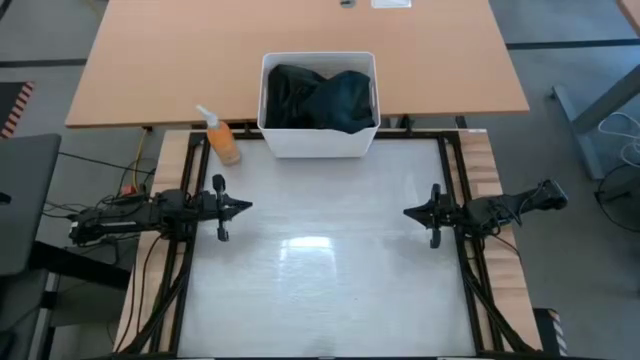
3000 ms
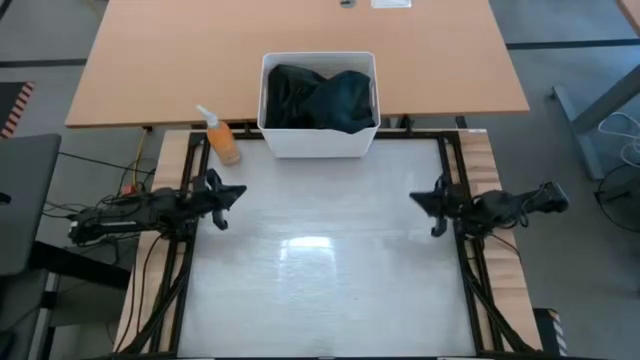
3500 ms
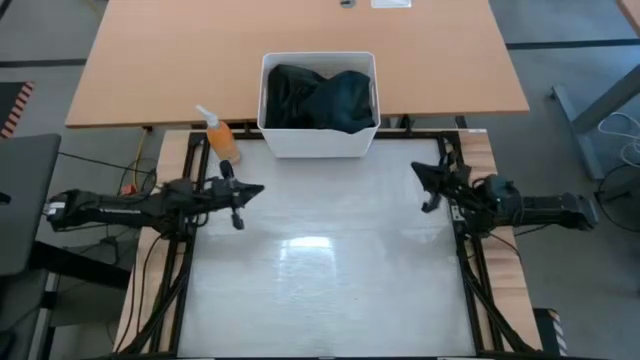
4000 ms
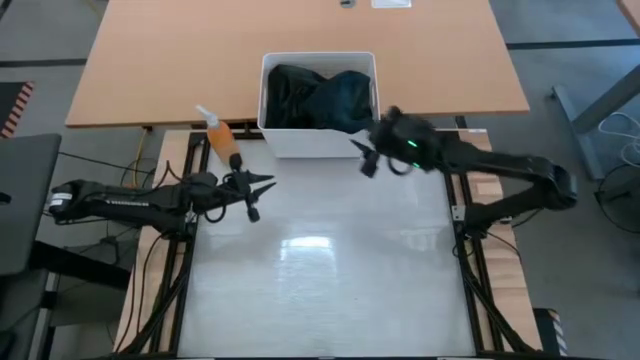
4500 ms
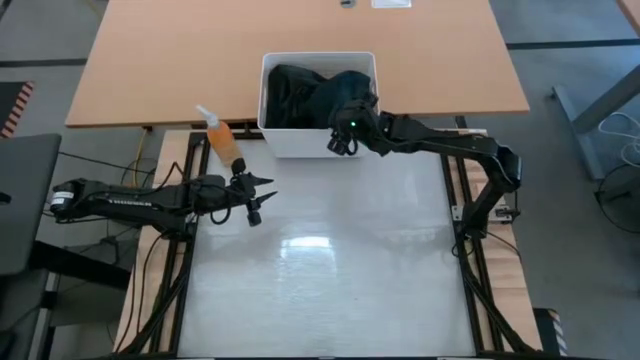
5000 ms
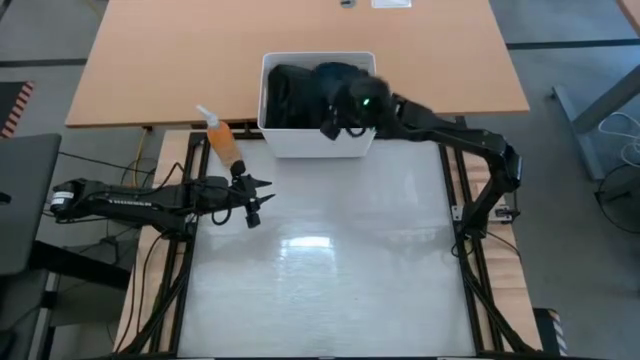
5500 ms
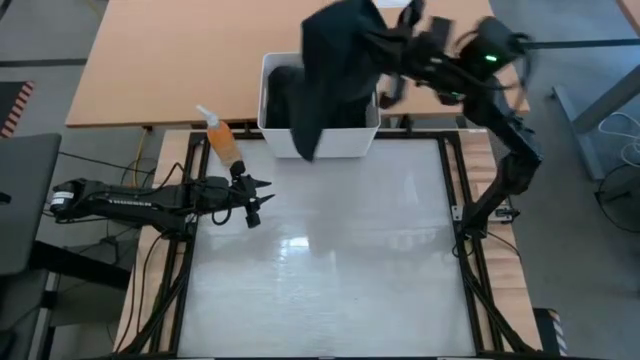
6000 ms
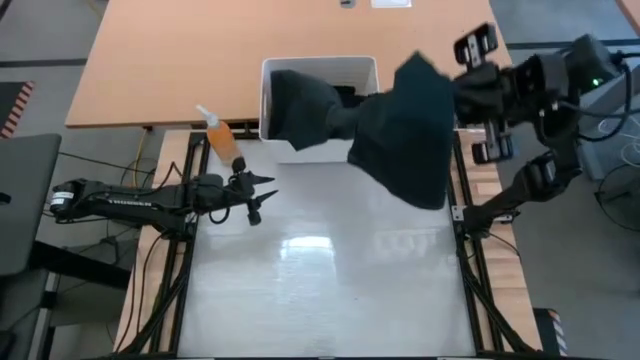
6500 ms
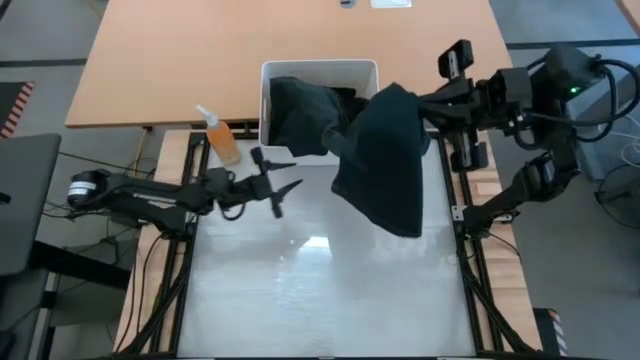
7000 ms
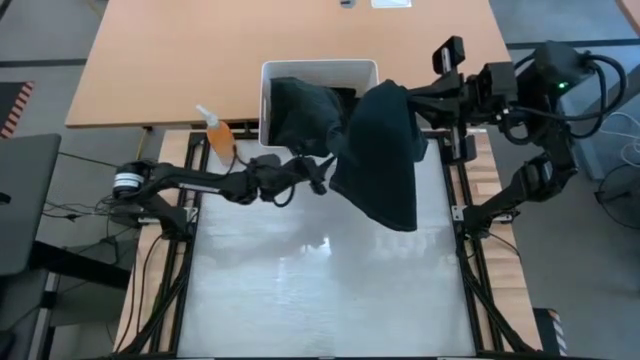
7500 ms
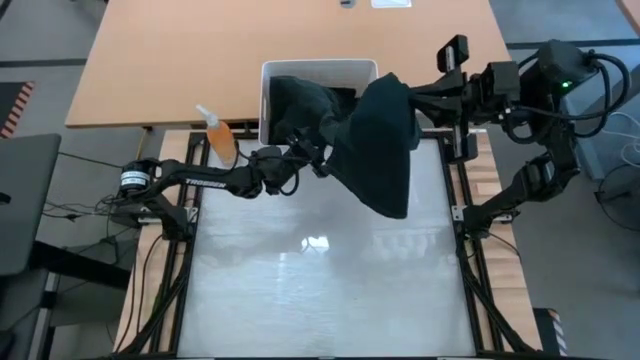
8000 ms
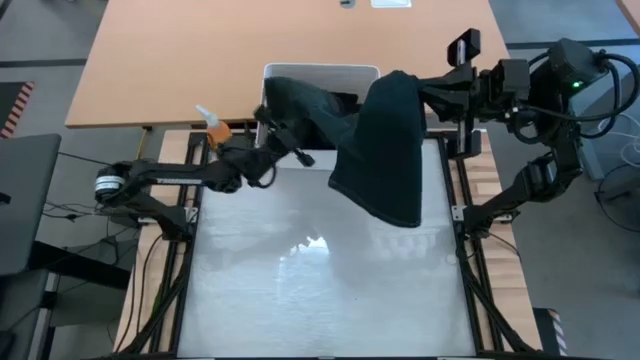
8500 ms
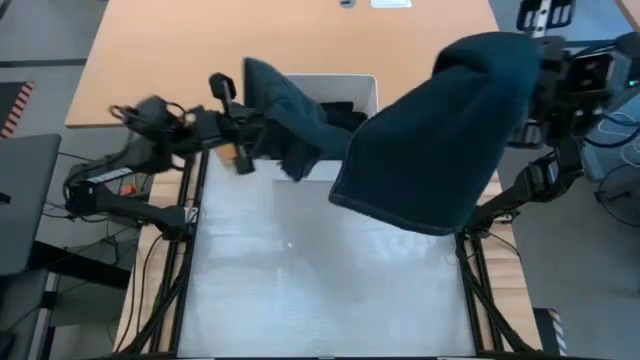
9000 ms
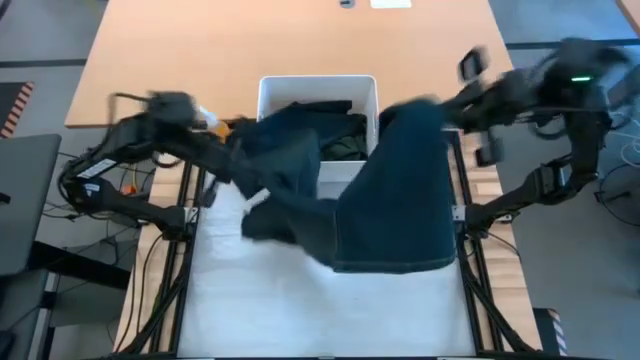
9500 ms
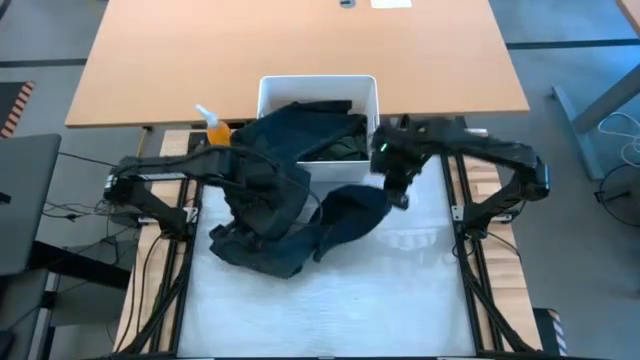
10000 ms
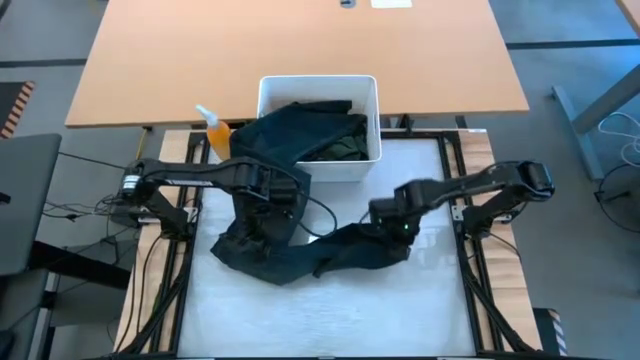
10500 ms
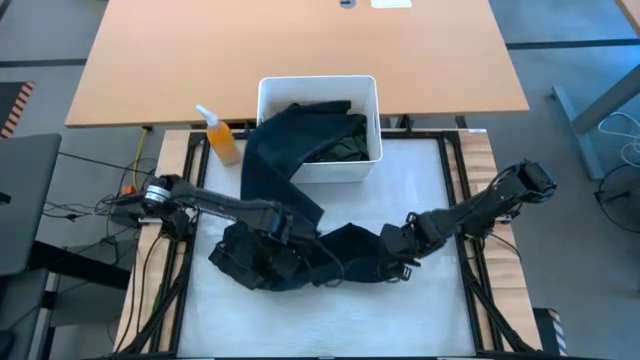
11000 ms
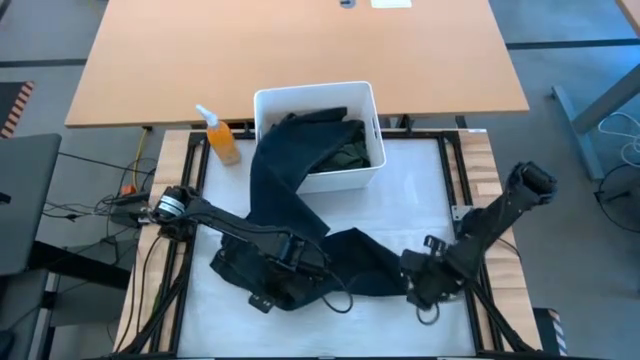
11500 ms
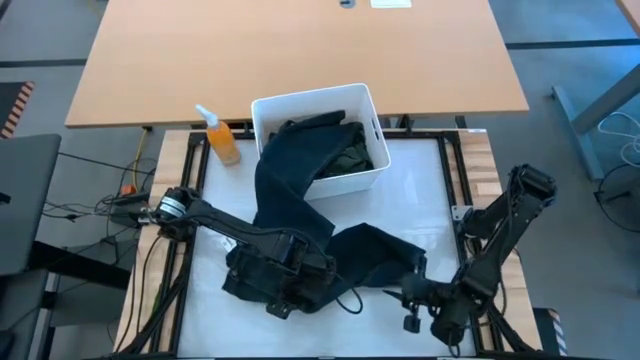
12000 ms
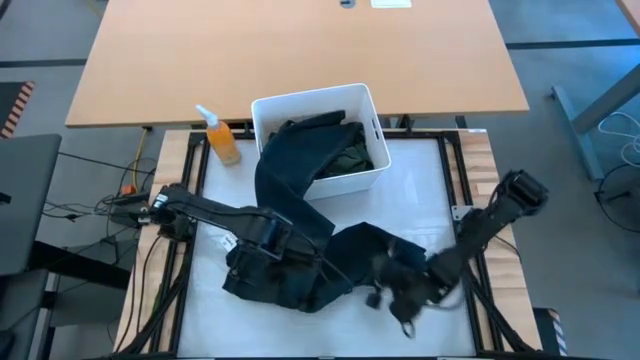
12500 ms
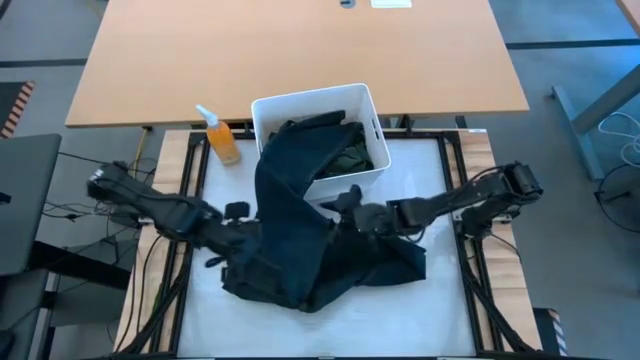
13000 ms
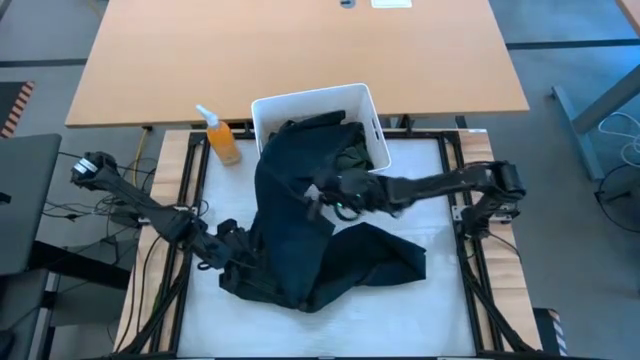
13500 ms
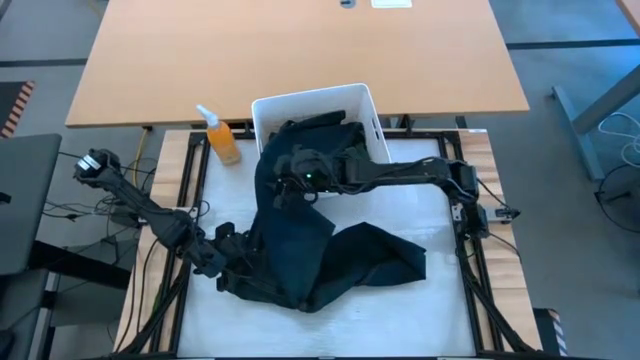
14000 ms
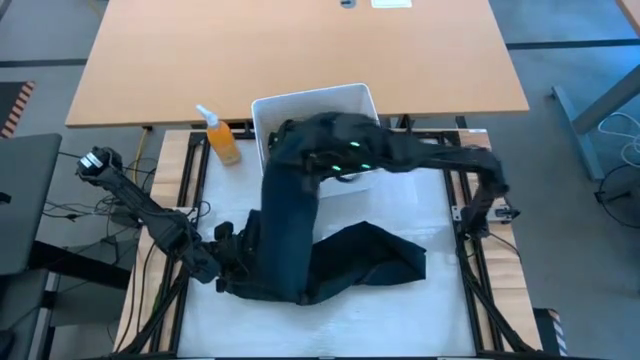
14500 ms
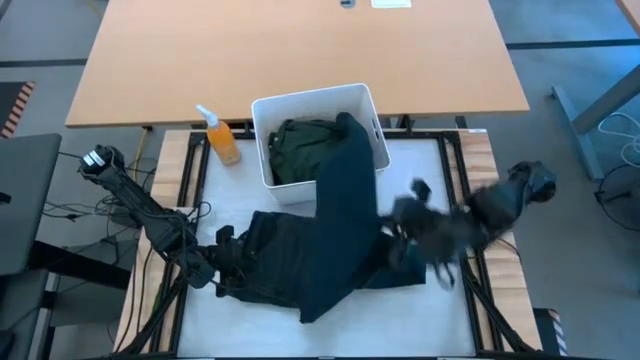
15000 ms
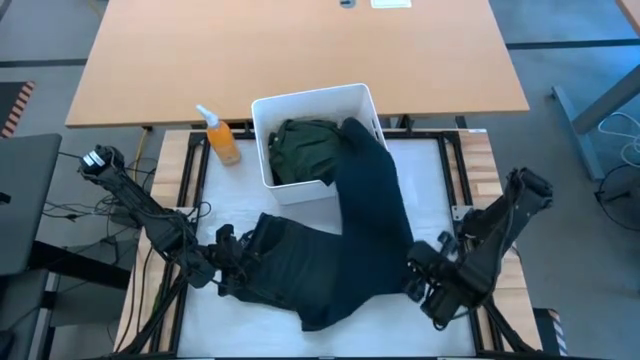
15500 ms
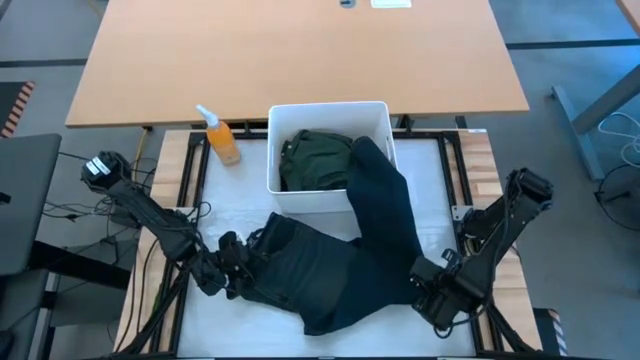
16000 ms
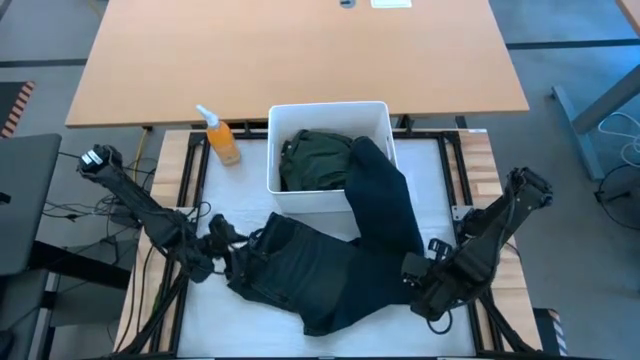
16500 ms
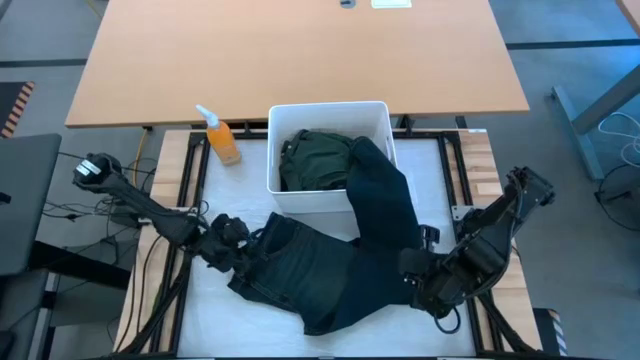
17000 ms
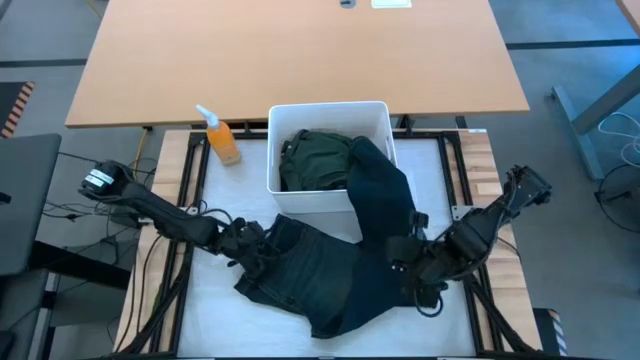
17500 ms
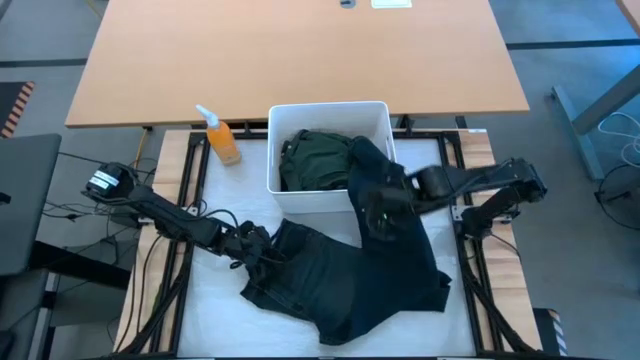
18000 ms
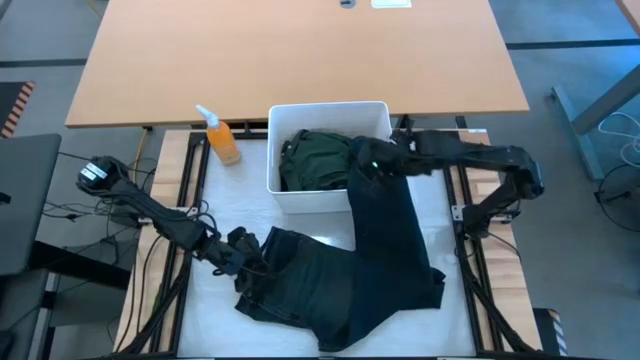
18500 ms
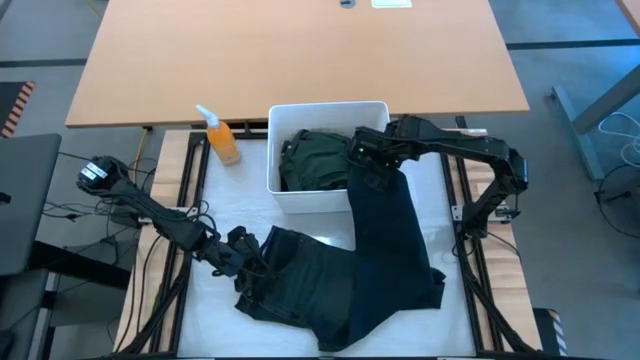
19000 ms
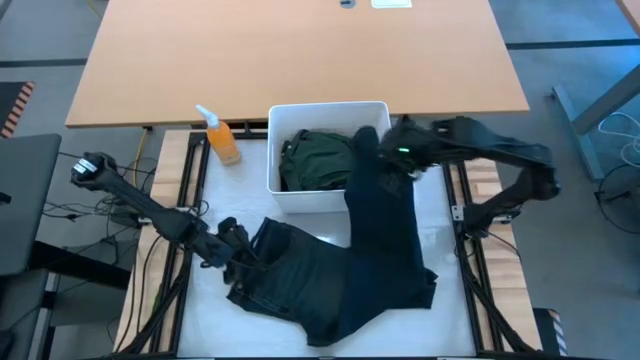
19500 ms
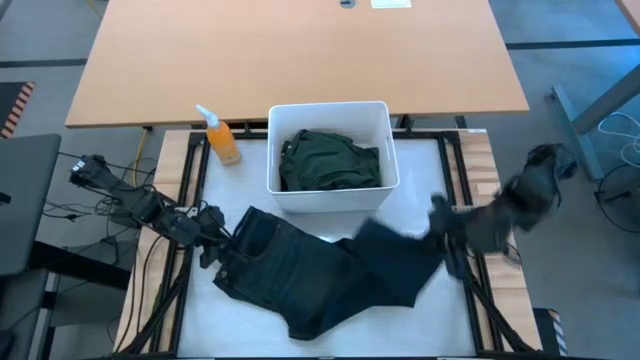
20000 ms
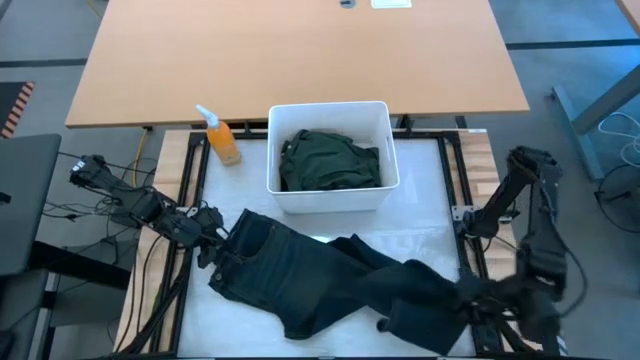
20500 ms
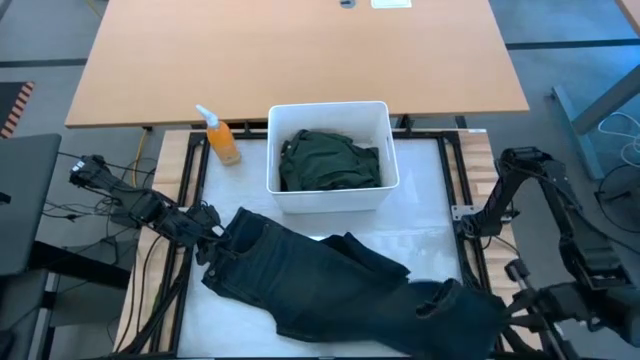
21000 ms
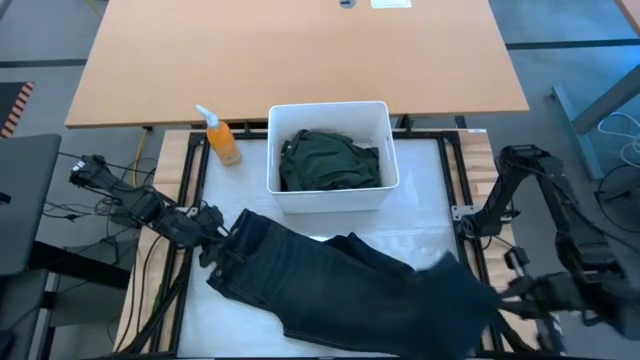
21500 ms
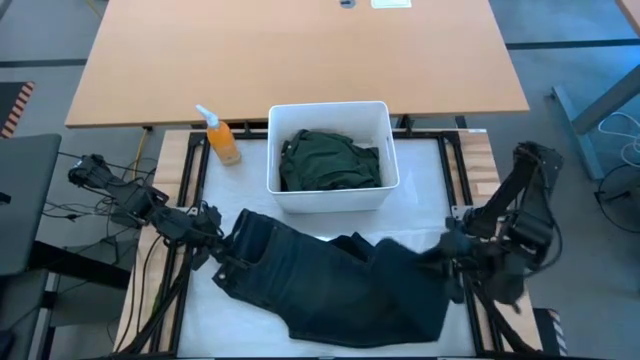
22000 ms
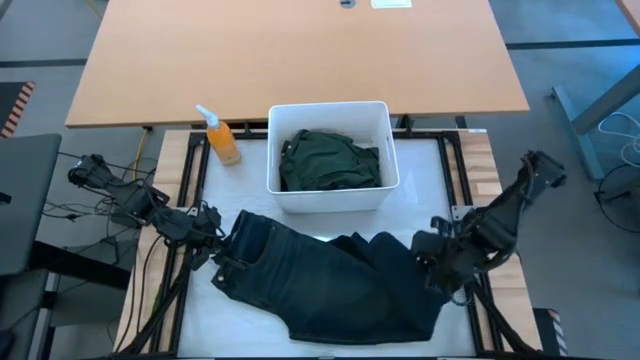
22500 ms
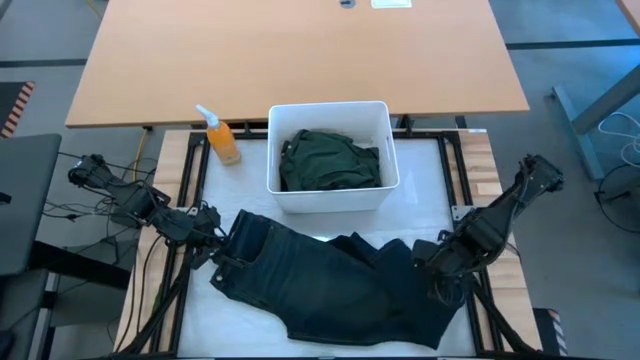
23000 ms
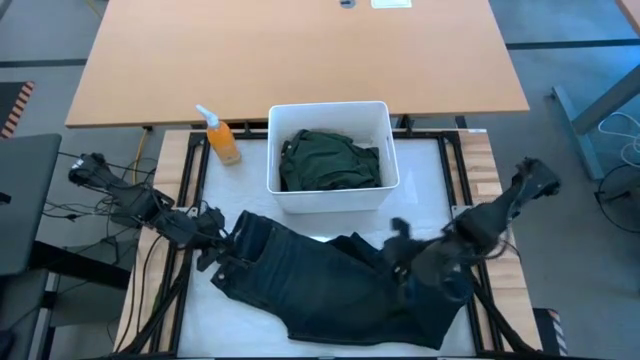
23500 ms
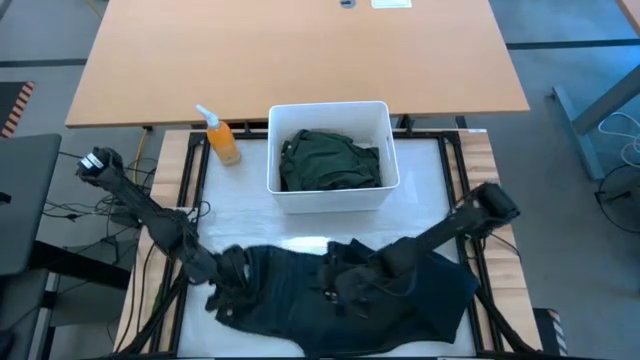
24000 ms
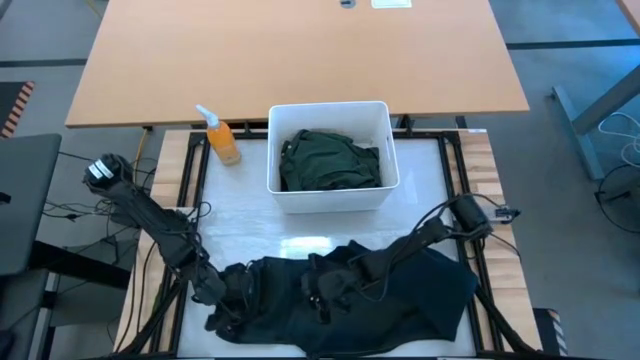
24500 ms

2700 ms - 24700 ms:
Task: Fold laundry
Remove the dark blue jeans from the white bin
